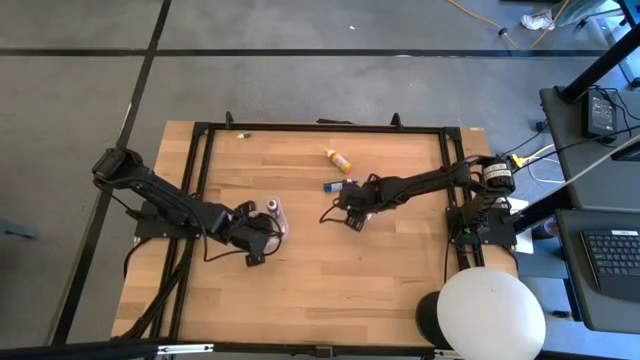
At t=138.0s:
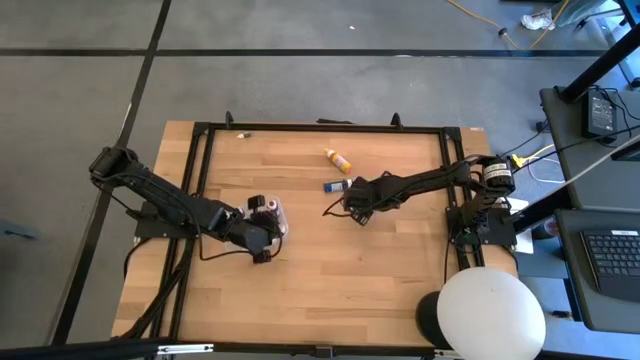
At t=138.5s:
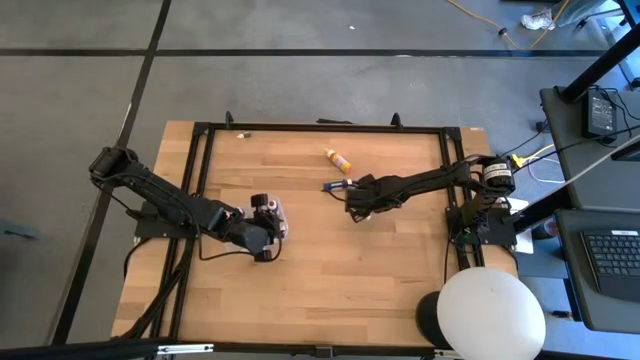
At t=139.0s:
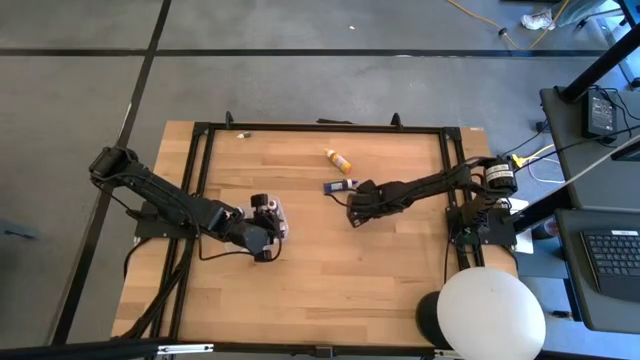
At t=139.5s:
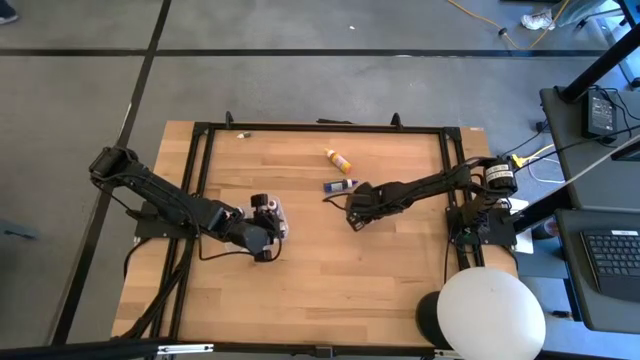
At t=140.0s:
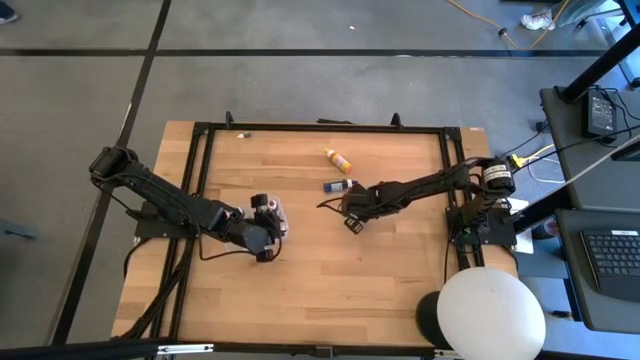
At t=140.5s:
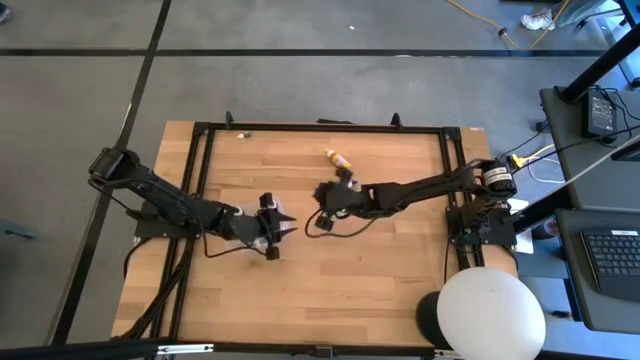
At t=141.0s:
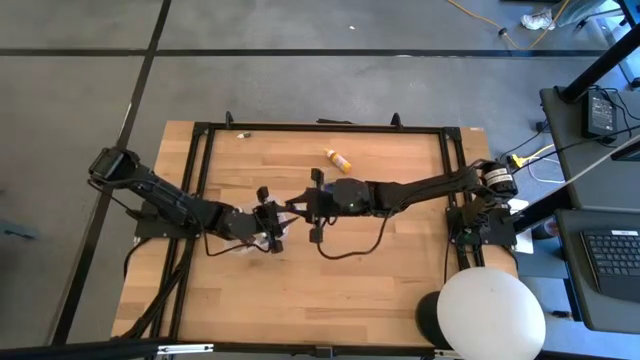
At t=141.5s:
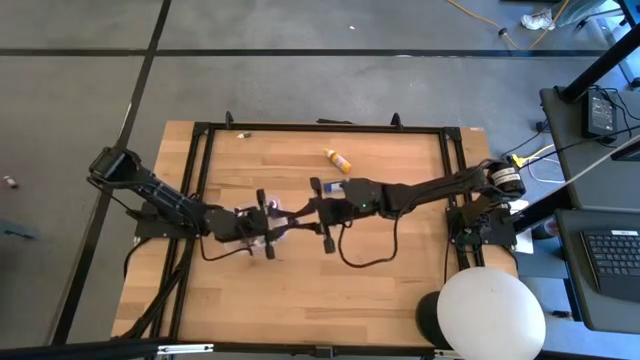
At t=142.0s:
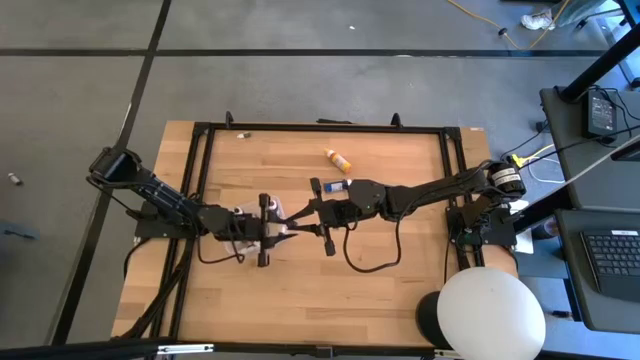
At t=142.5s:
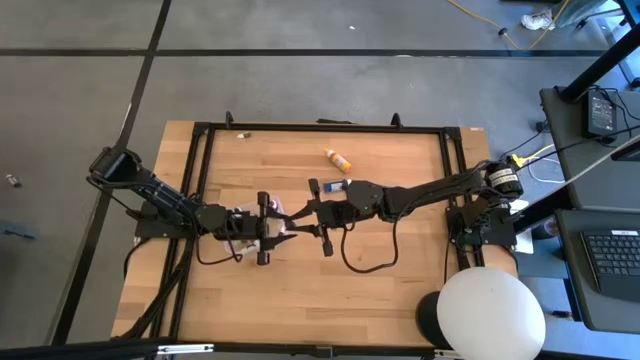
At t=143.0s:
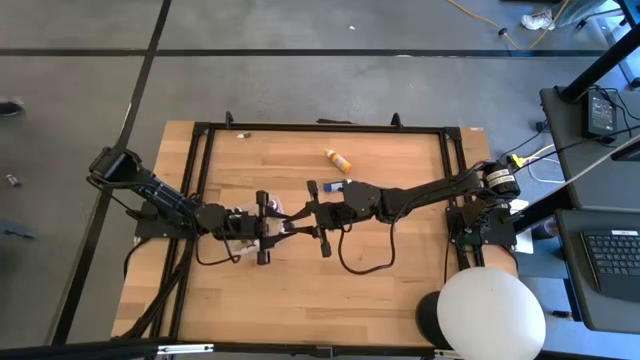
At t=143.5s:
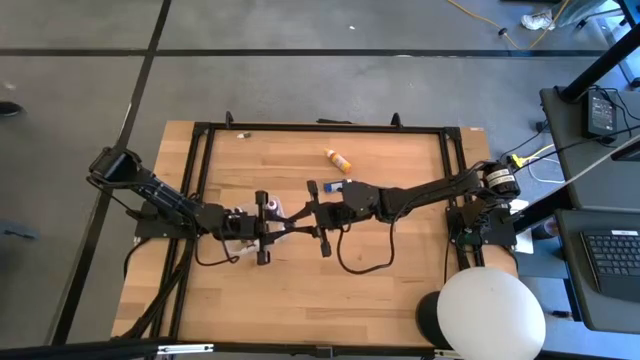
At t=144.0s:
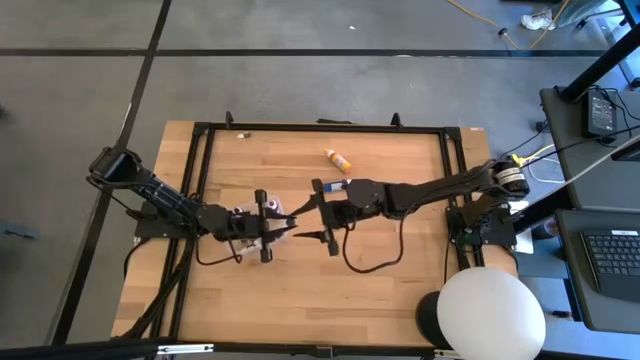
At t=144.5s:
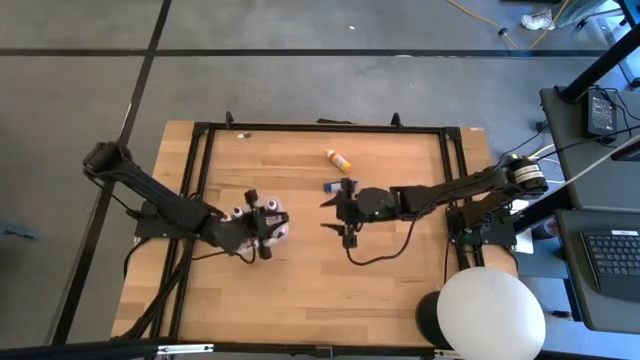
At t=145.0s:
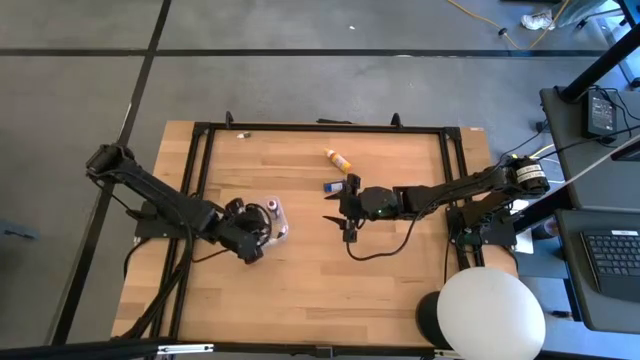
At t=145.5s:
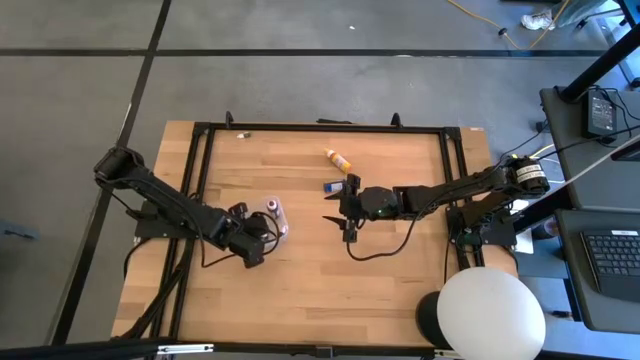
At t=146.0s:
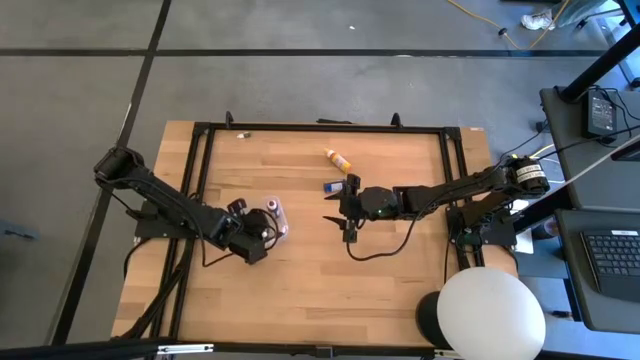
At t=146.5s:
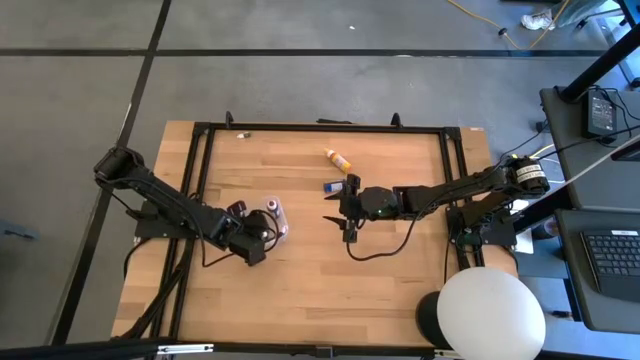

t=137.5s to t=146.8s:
Task: Pick & Place food coloring
Put the small purple food coloring bottle into the transparent bin

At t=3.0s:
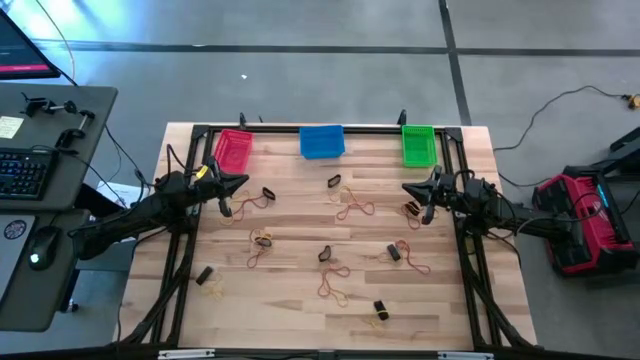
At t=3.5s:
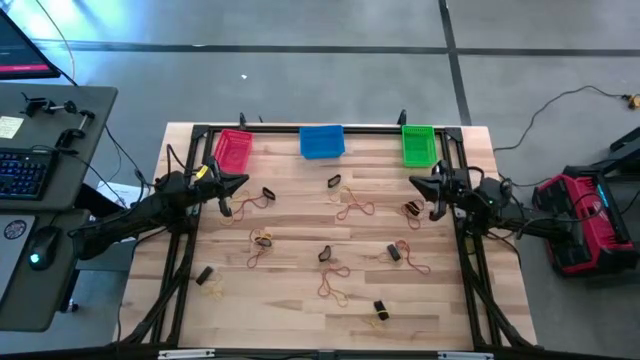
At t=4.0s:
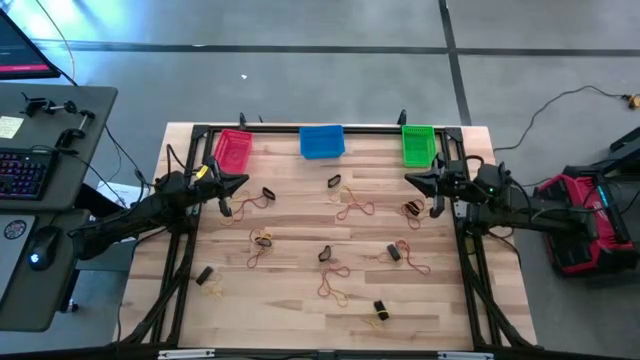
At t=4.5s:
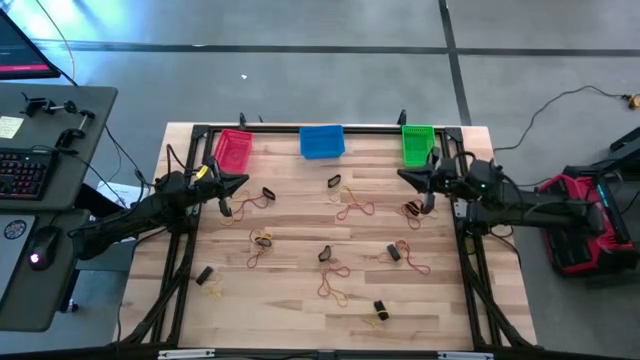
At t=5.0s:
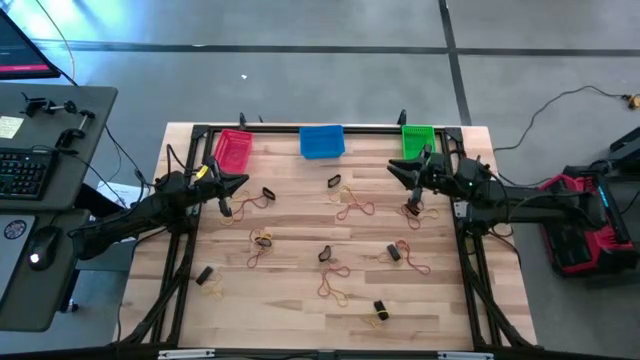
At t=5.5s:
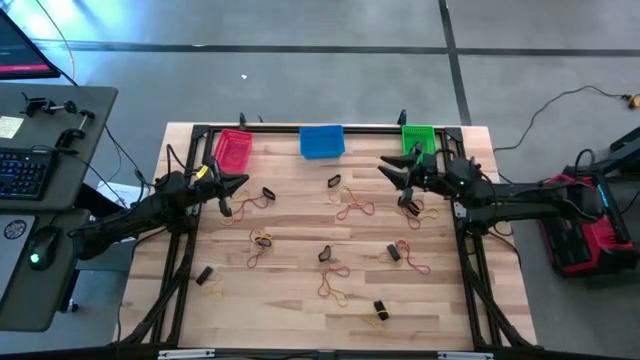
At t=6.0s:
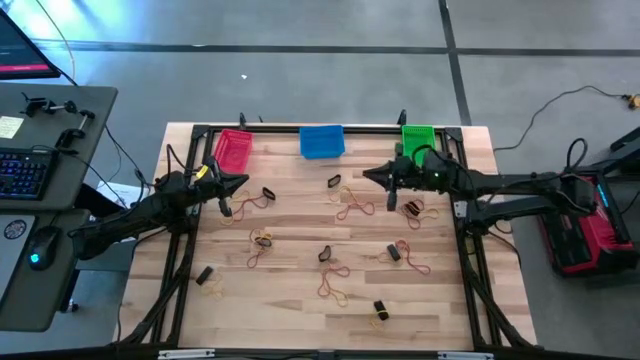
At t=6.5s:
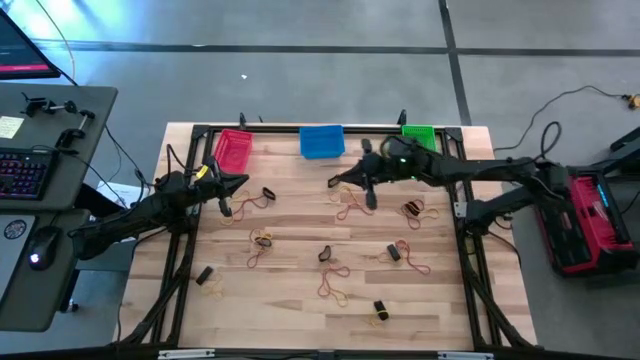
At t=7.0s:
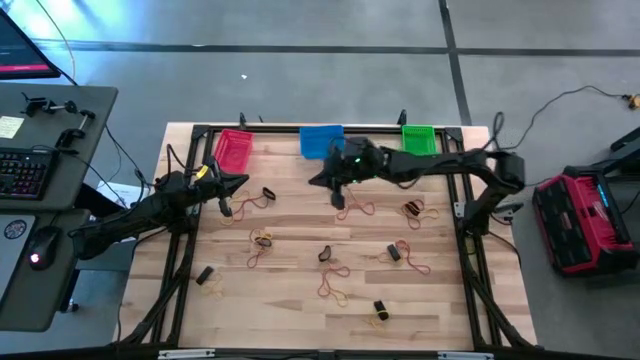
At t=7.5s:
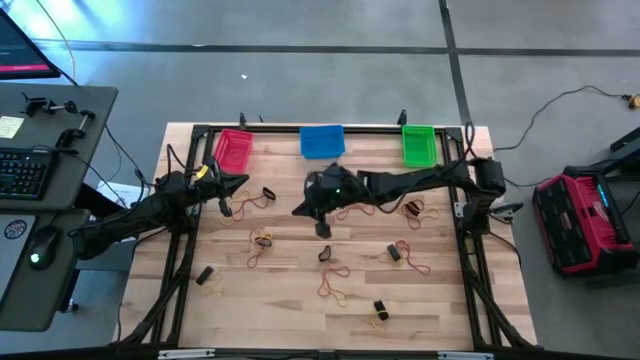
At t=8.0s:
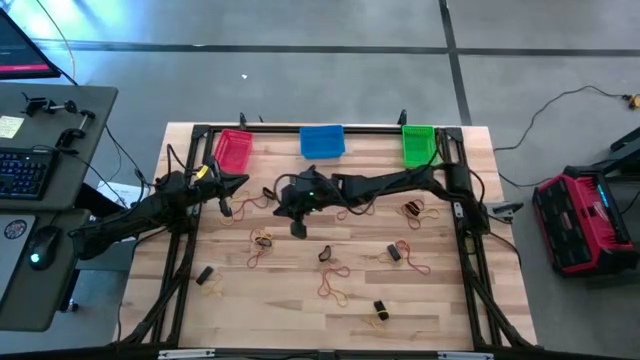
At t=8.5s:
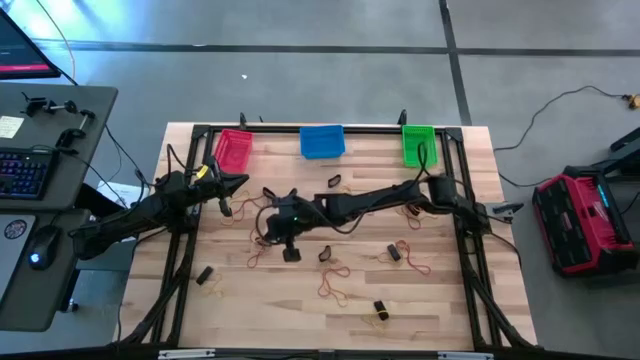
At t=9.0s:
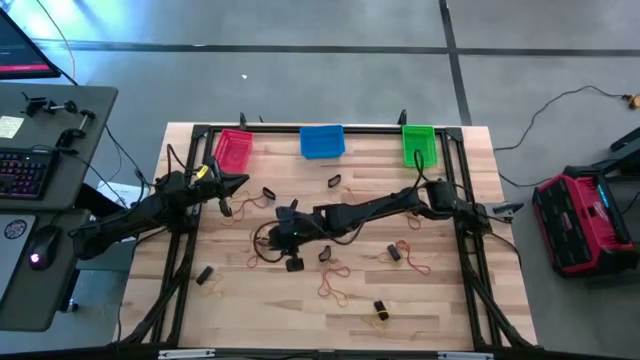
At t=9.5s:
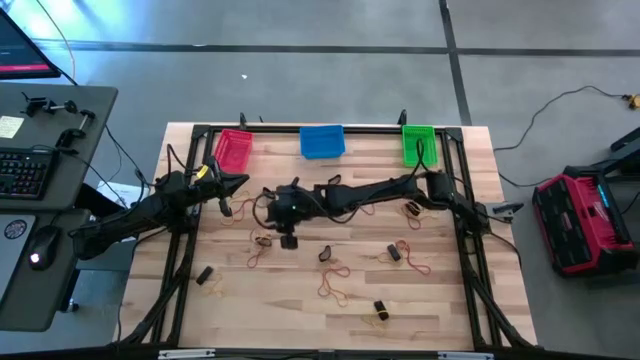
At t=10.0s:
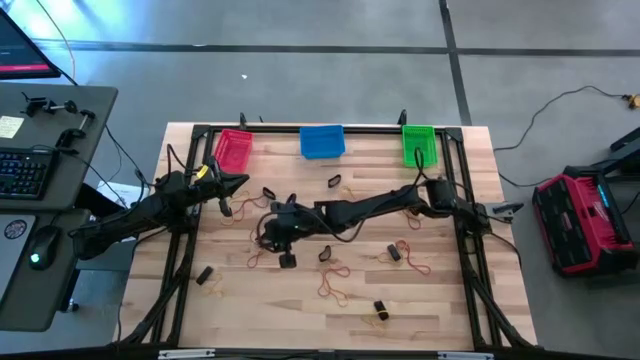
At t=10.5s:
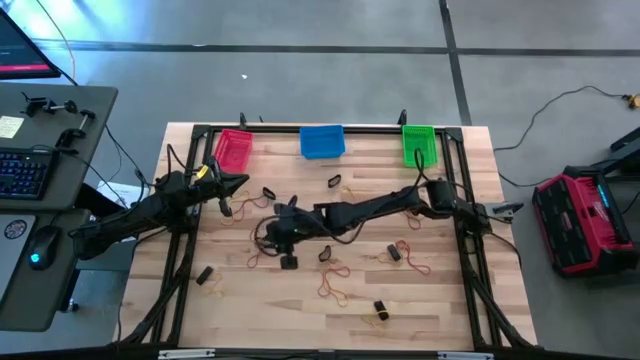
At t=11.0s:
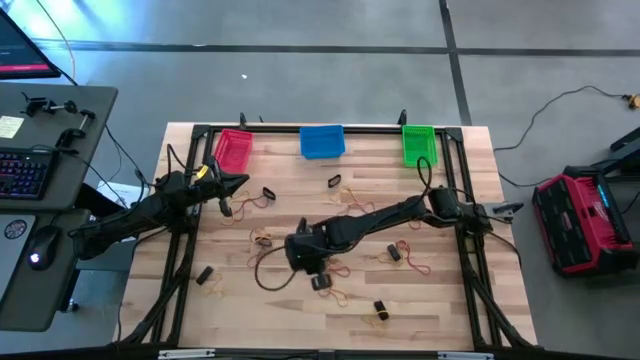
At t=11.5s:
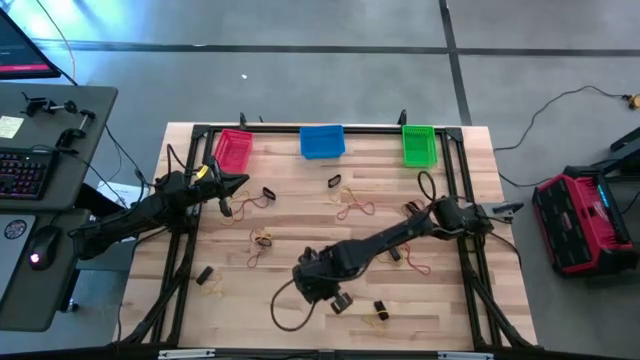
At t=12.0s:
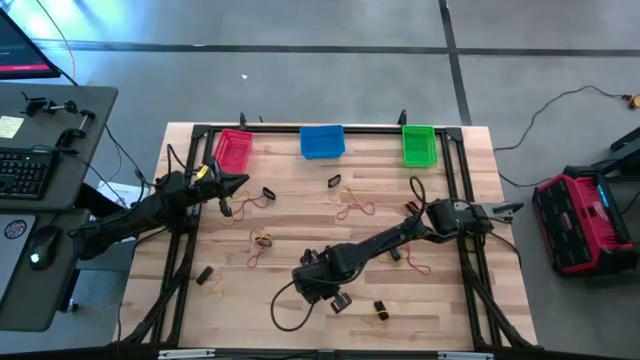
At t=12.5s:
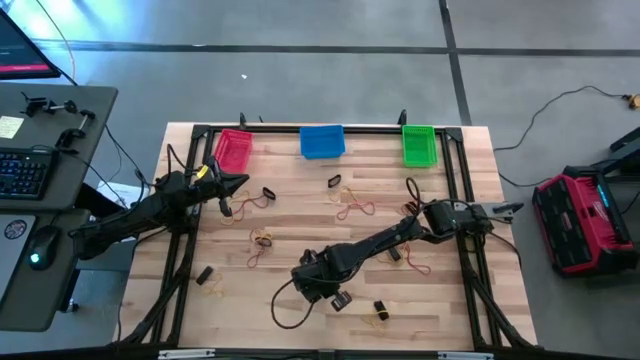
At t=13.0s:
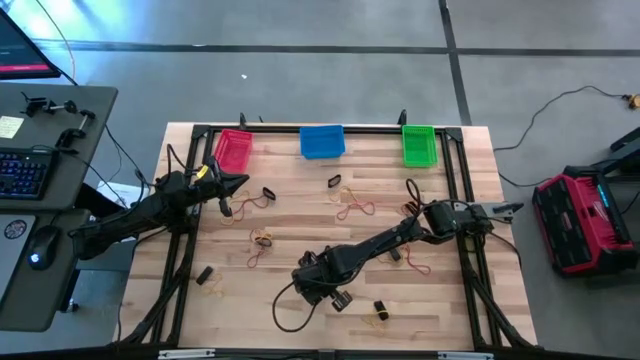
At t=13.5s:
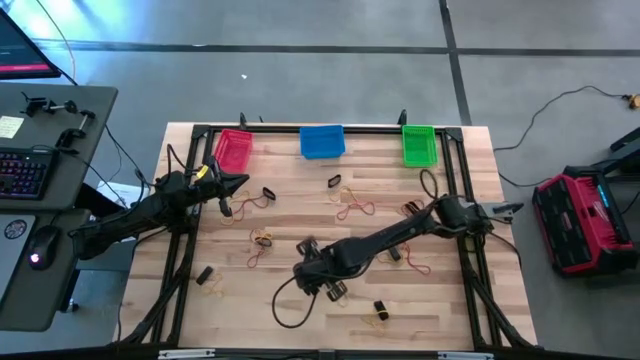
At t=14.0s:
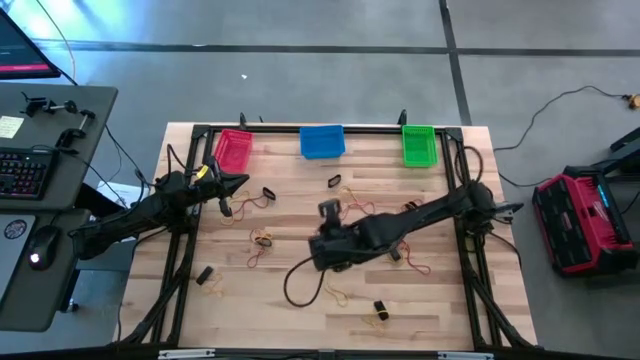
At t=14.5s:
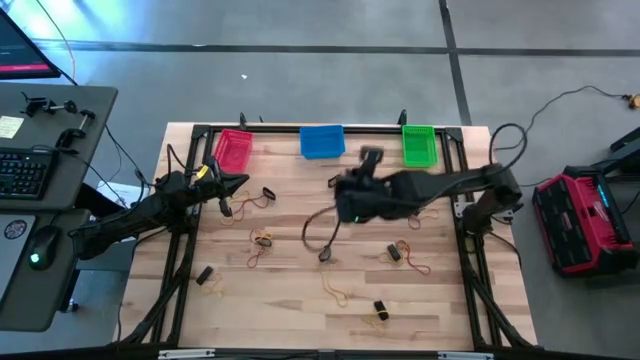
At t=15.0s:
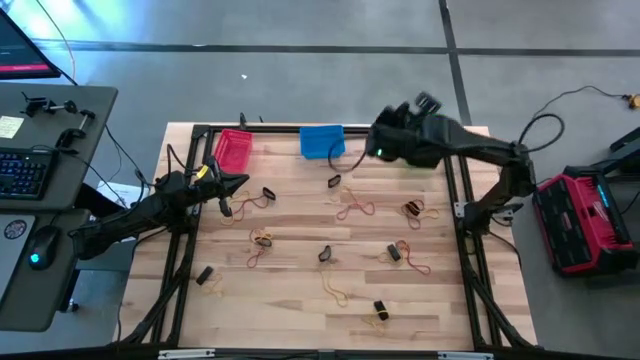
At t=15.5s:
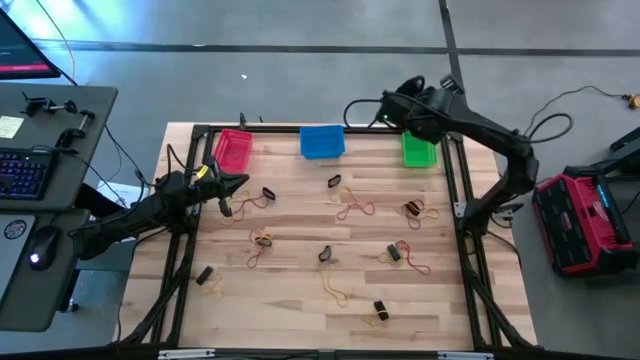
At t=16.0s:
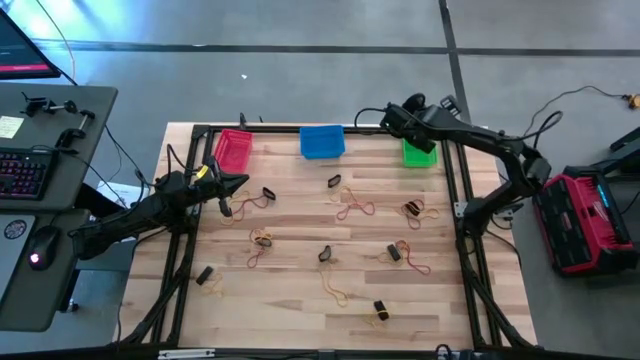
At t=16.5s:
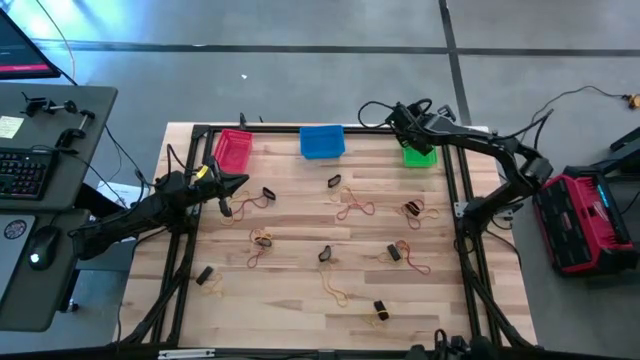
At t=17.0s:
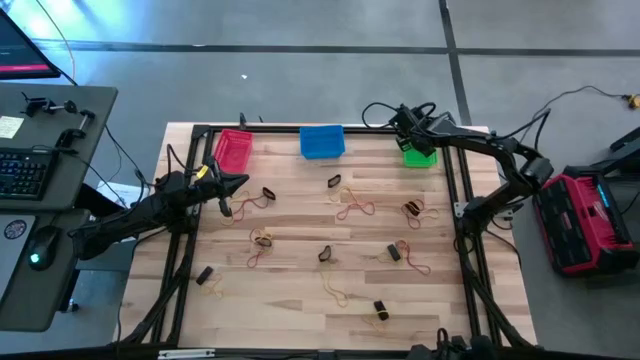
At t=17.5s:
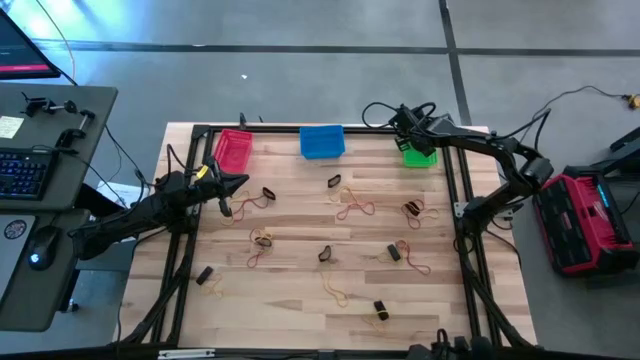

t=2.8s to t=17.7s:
Task: Sort rubber bands into baskets
Put the red rubber band into the green bin
